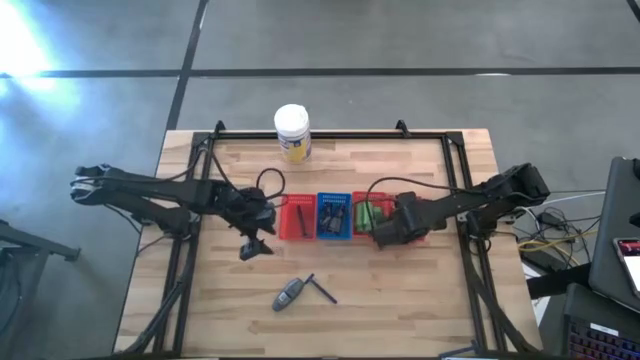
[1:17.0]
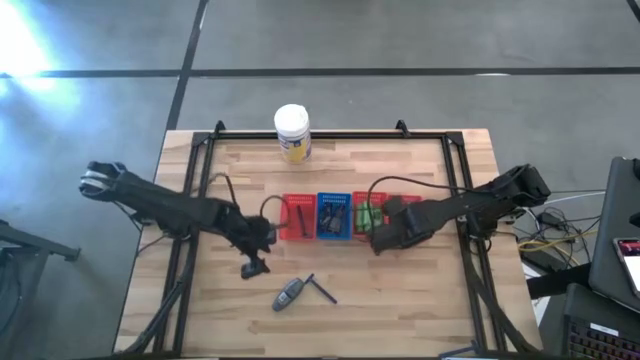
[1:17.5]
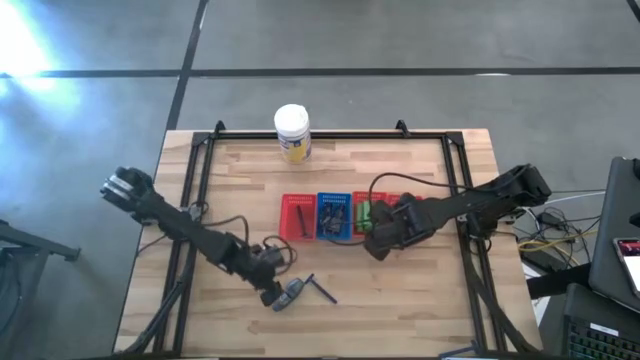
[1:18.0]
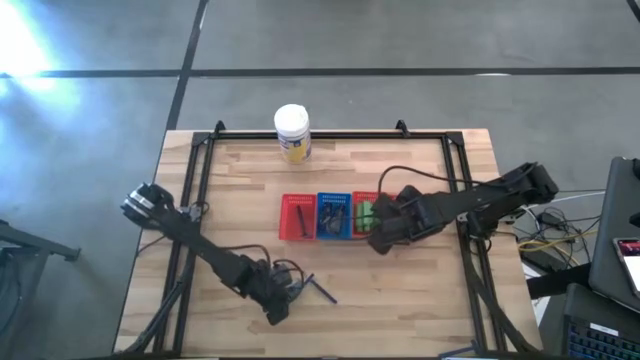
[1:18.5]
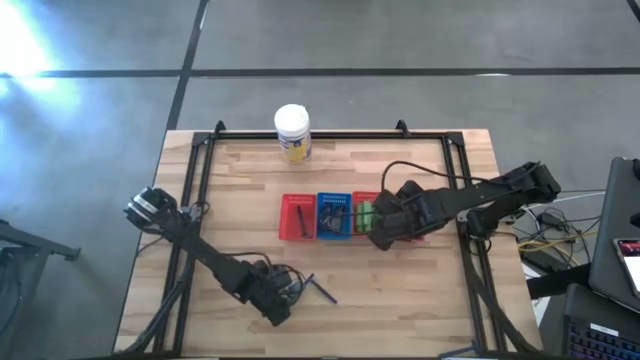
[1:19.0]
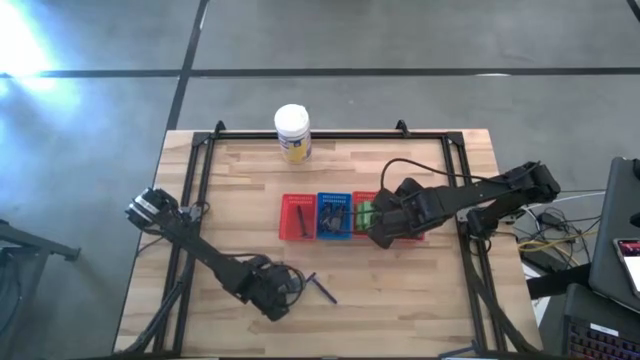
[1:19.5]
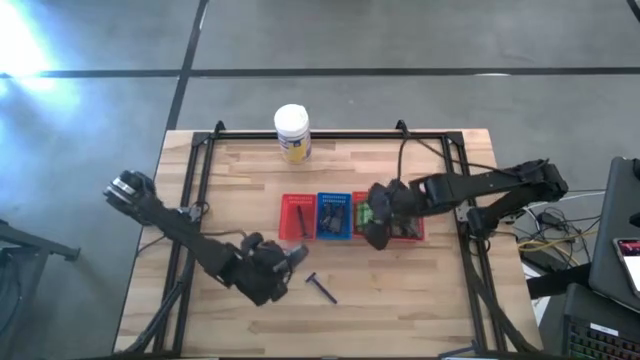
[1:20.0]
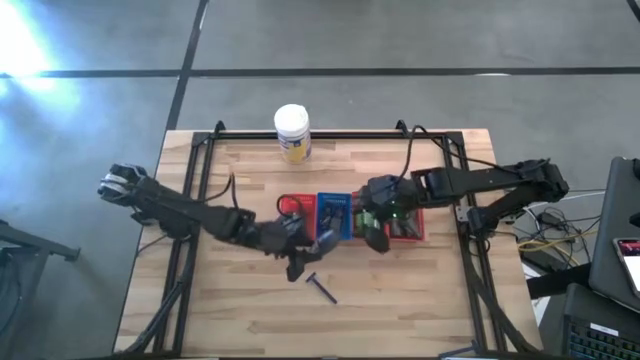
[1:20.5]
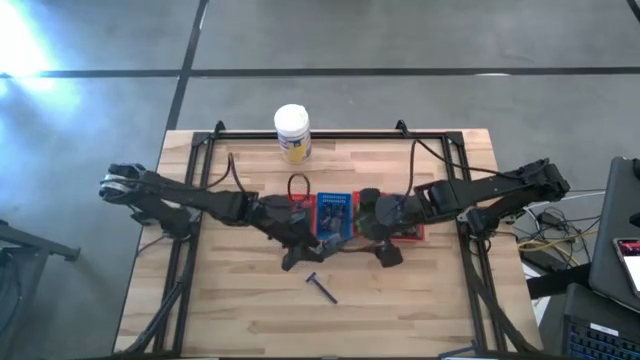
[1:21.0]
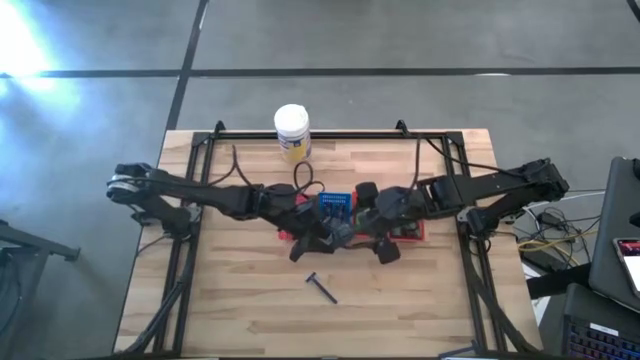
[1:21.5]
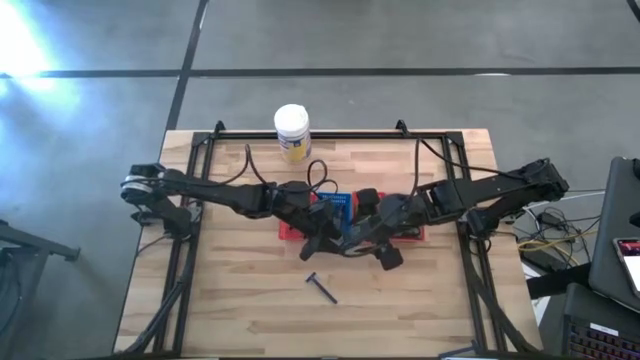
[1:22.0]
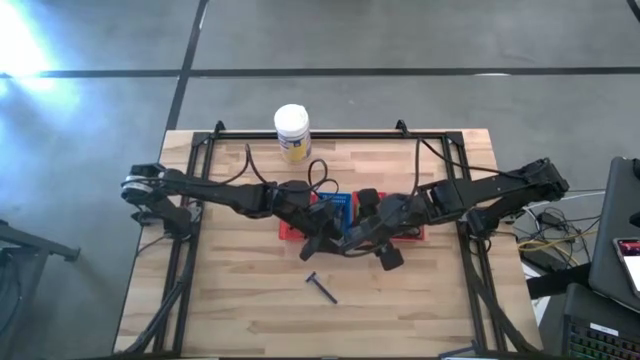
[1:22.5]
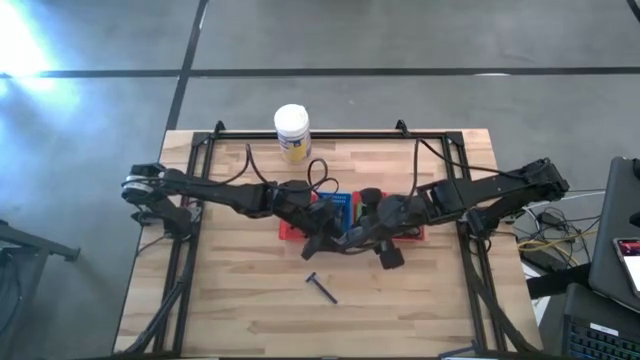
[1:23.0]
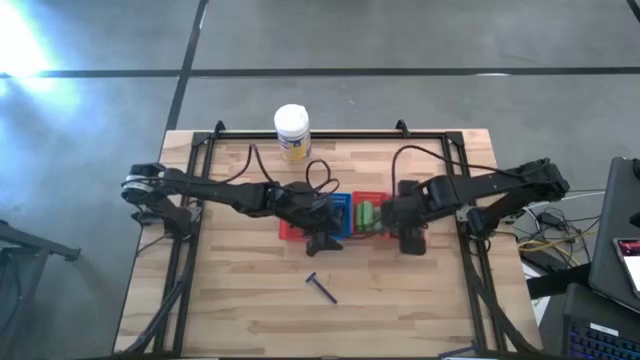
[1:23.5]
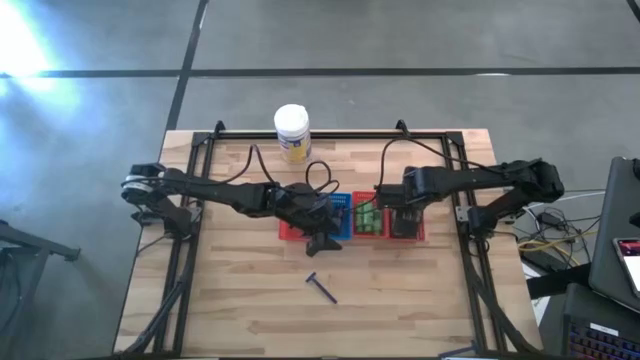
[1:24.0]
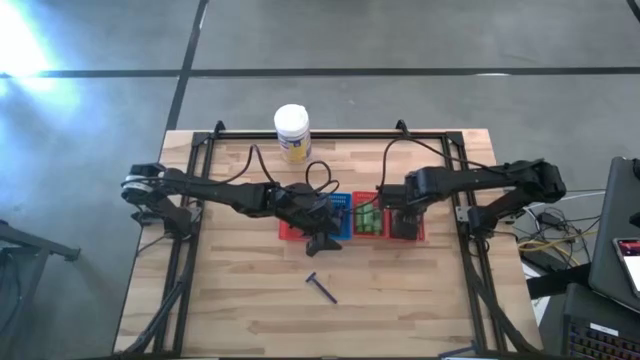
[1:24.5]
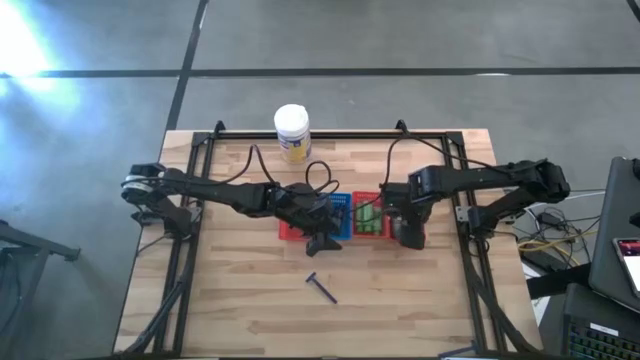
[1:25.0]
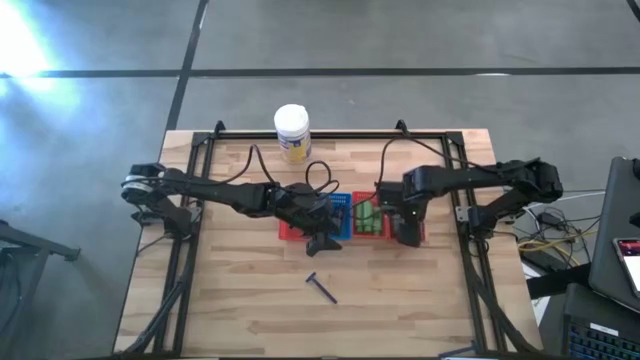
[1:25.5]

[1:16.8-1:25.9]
Task: Pick & Place Travel size toiletries
Put the gray deodorant into the right red bin

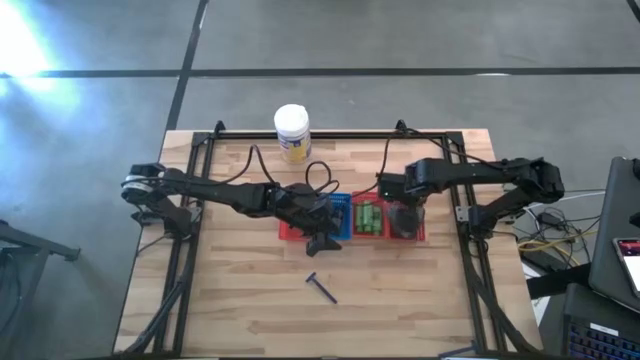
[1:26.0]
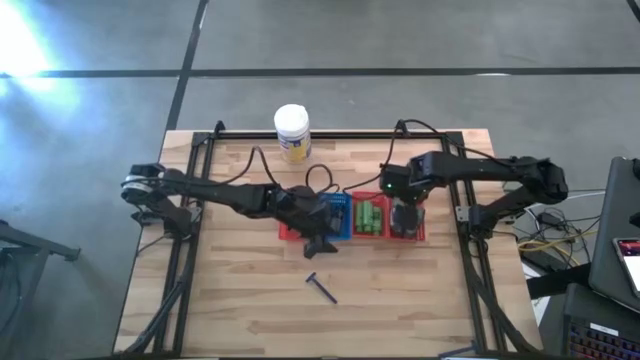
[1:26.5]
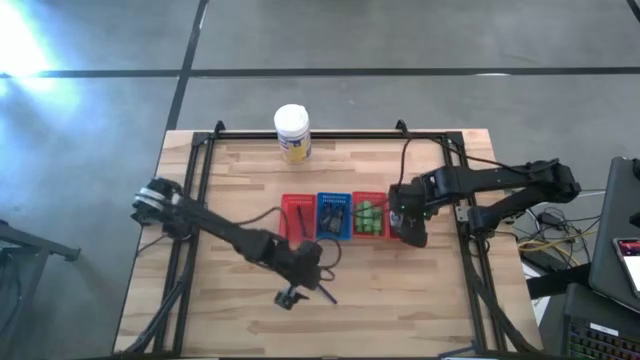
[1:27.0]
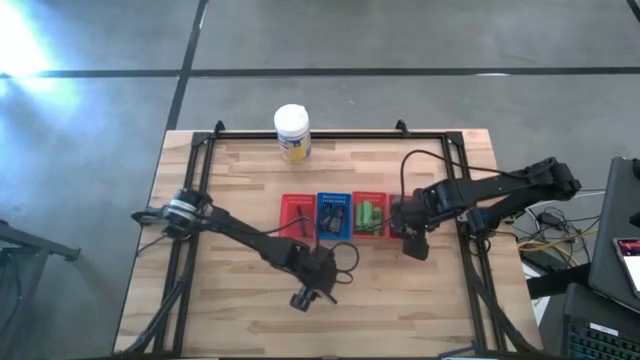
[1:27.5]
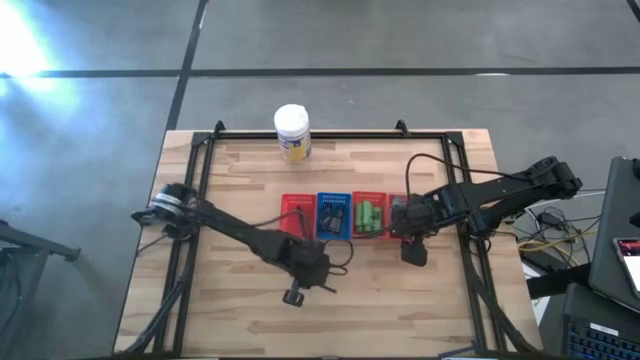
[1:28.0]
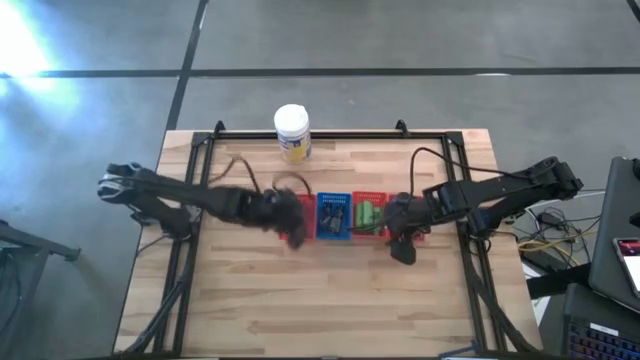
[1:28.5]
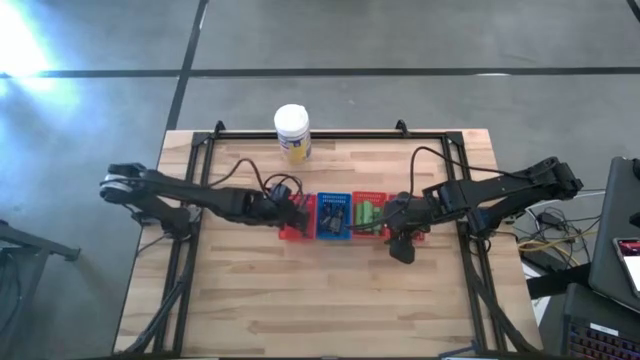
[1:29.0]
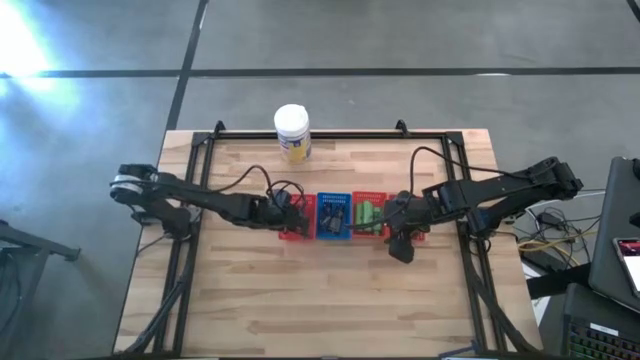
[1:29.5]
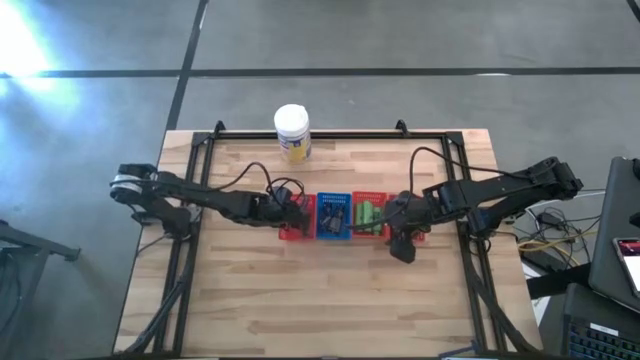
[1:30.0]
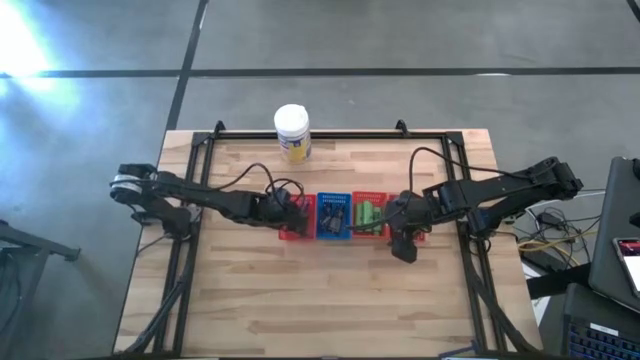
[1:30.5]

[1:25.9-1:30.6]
Put the blue razor into the left red bin

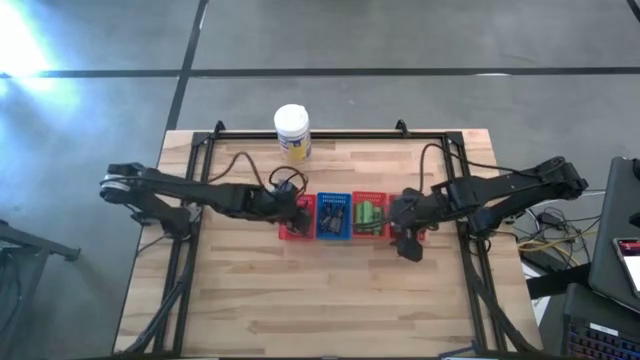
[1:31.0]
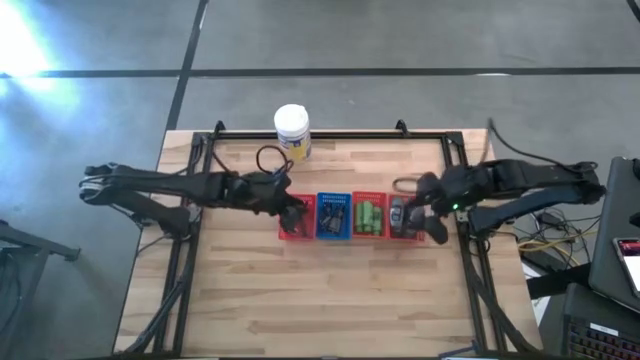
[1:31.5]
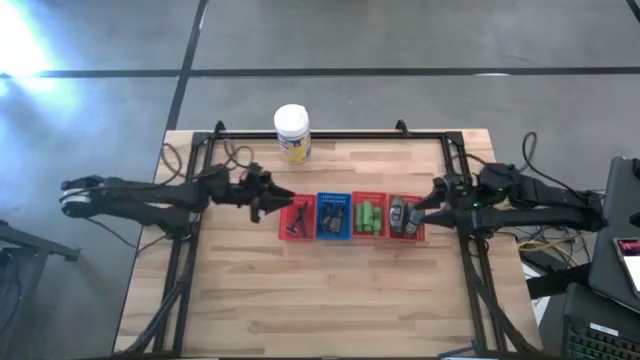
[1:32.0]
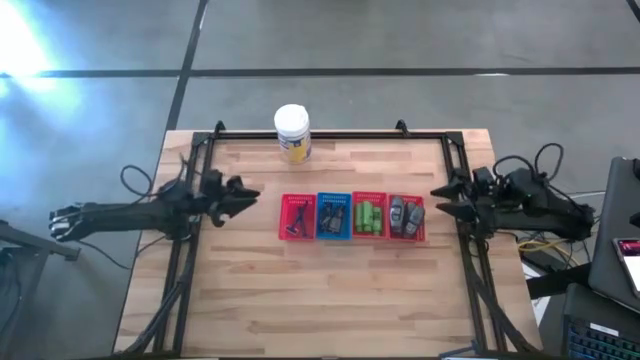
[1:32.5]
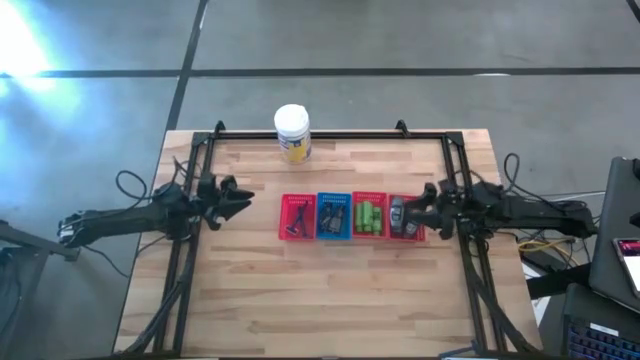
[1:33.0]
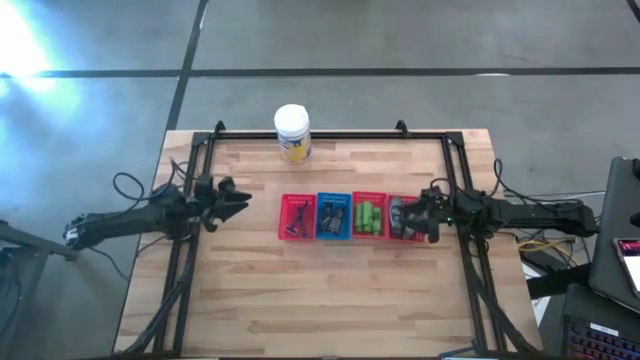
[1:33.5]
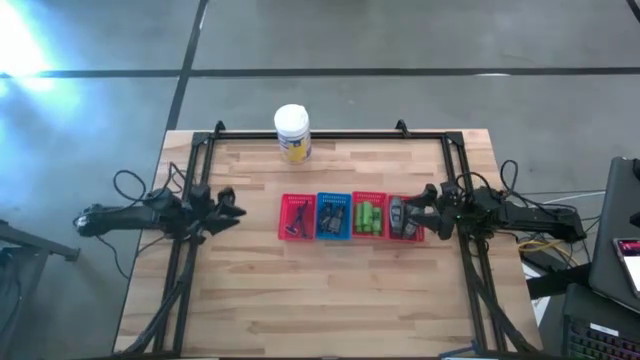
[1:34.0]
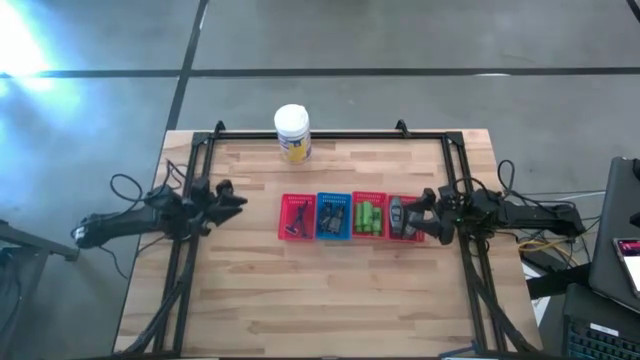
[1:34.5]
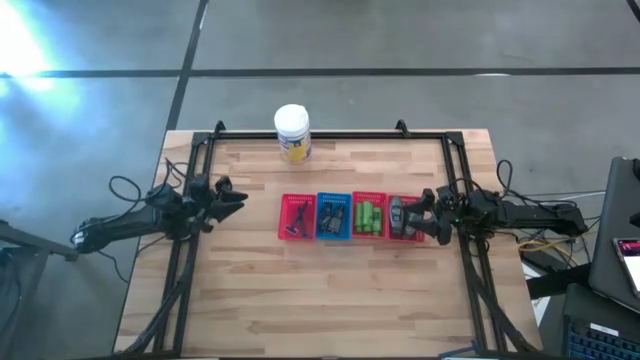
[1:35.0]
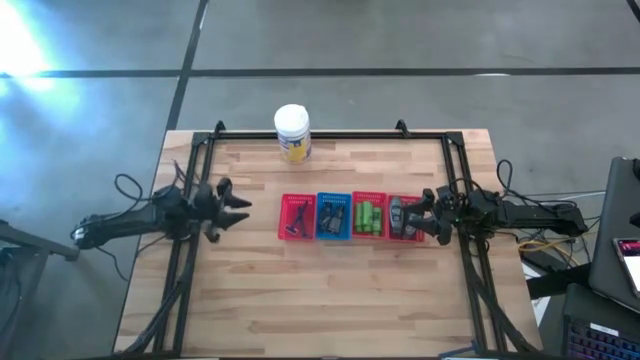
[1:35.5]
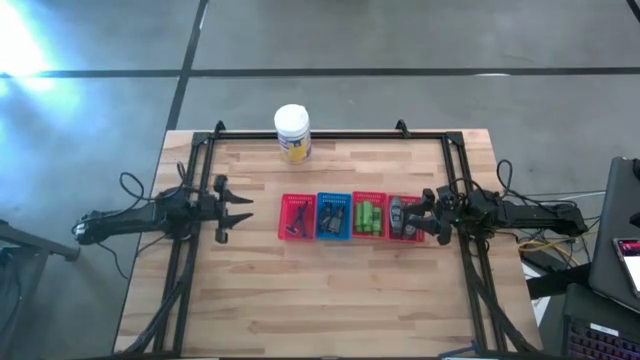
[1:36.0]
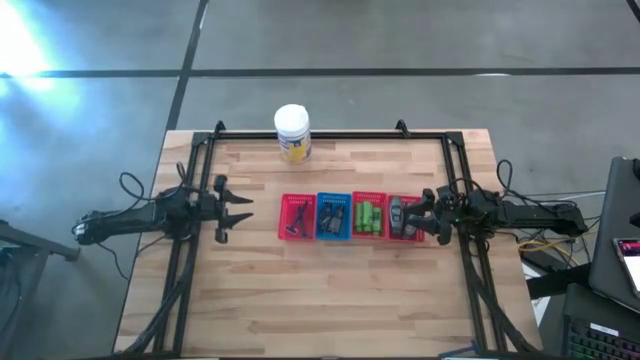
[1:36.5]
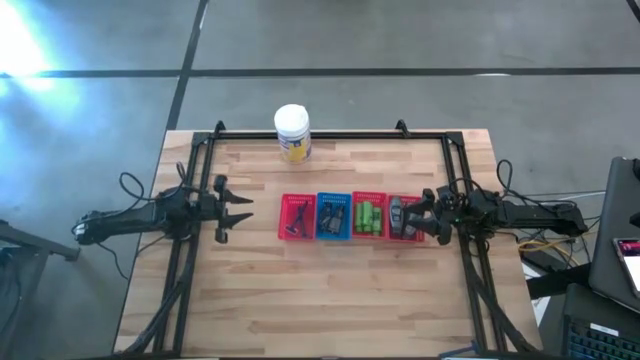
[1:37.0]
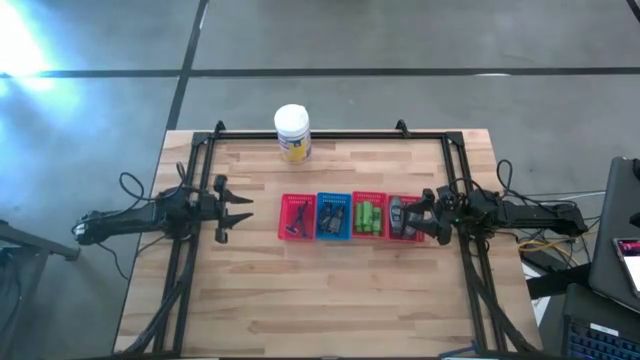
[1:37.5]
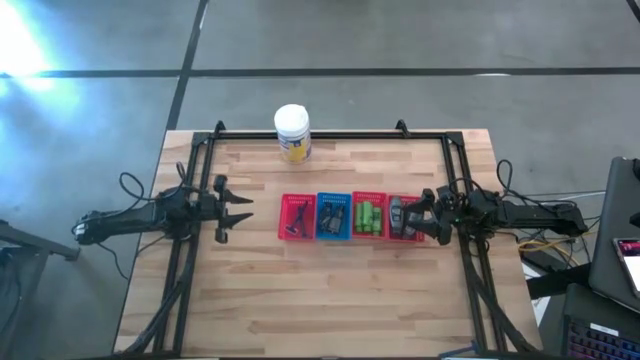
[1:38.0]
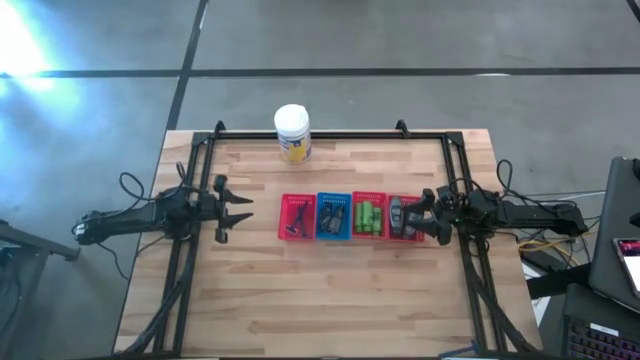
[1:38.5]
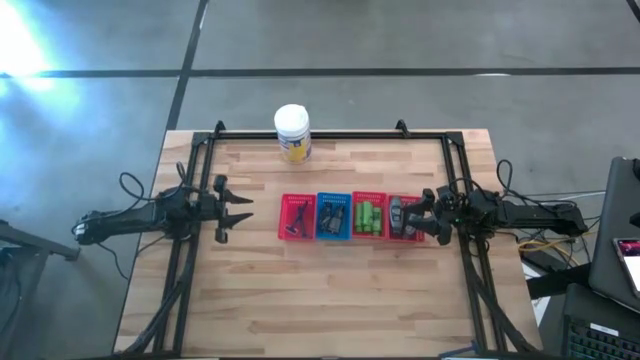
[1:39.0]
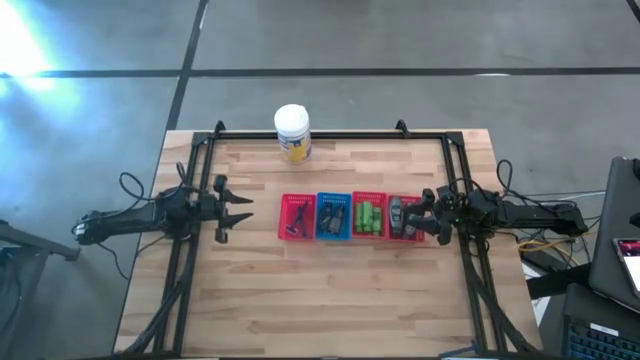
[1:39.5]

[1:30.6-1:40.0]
Return to Home Position
